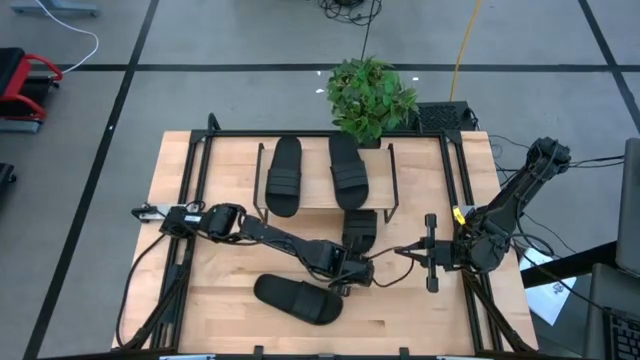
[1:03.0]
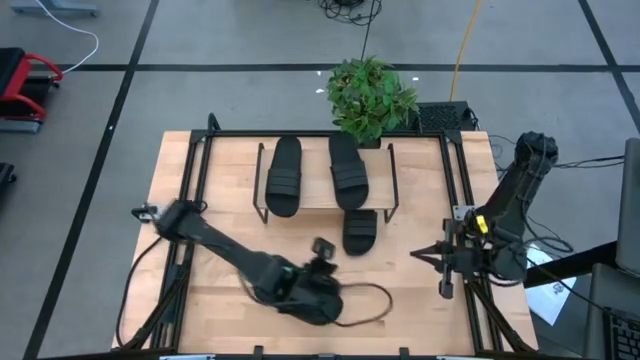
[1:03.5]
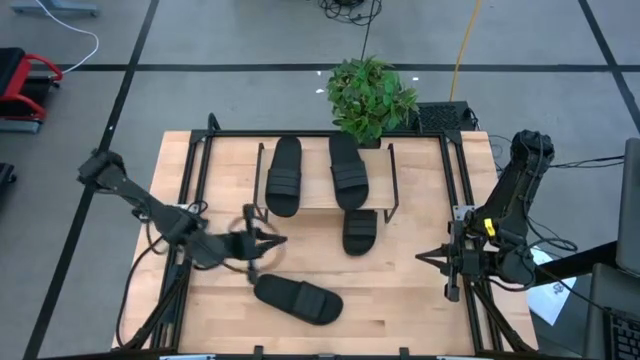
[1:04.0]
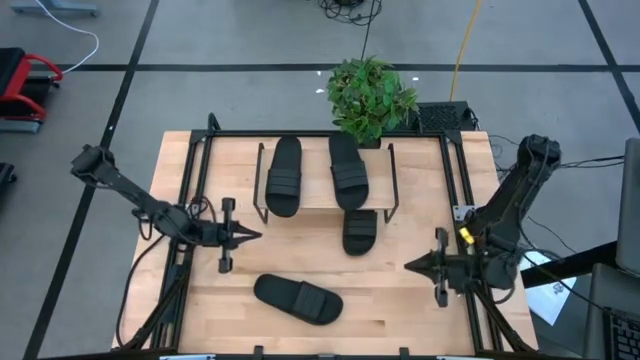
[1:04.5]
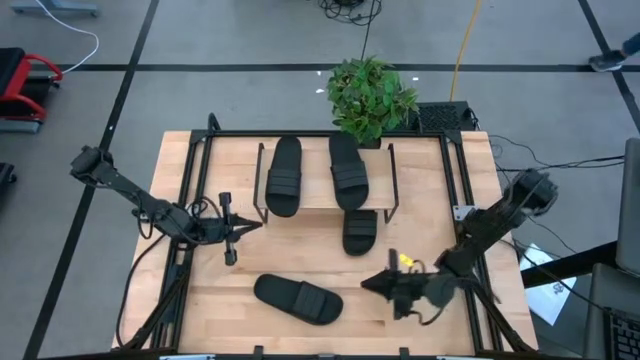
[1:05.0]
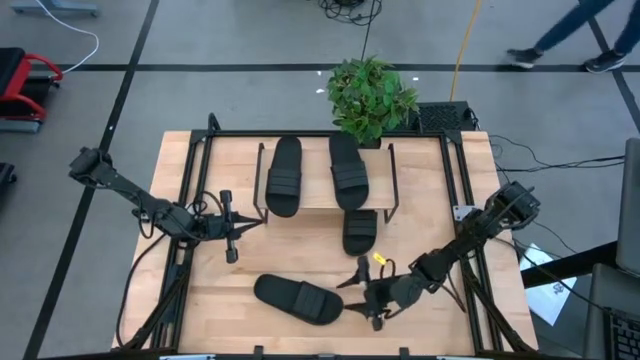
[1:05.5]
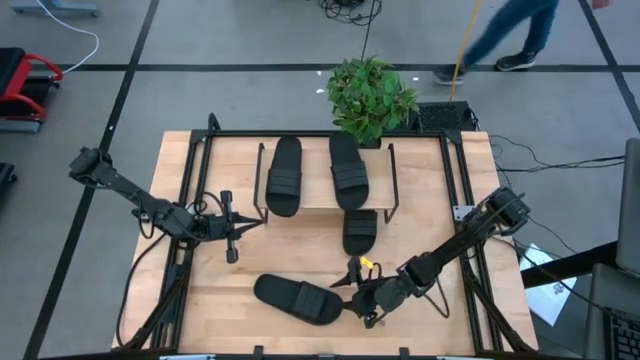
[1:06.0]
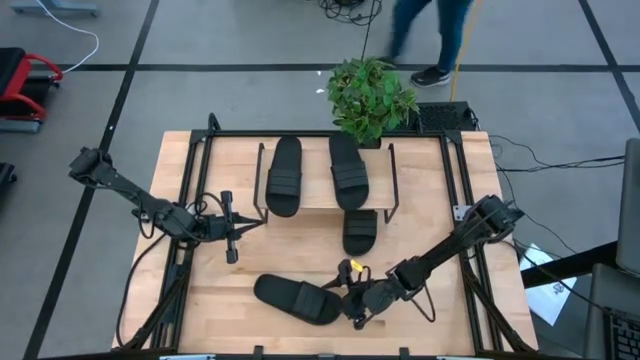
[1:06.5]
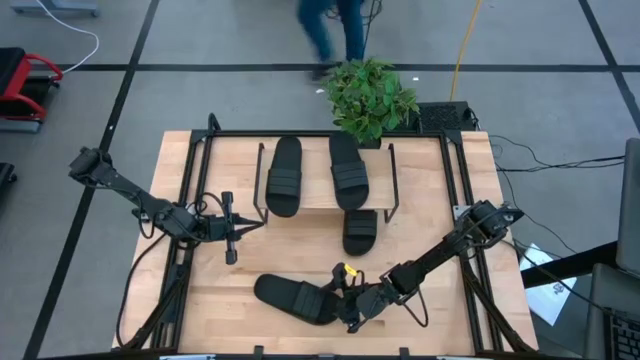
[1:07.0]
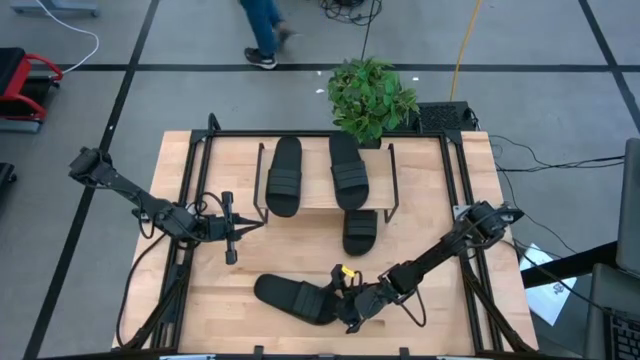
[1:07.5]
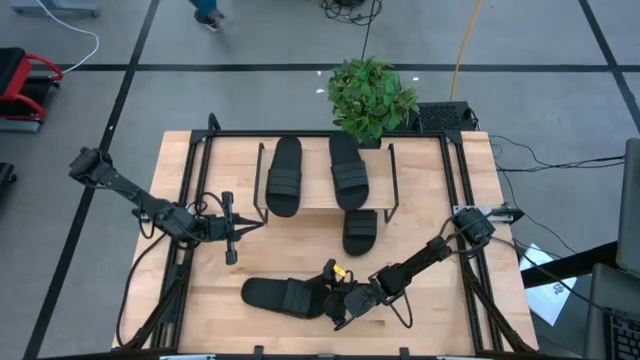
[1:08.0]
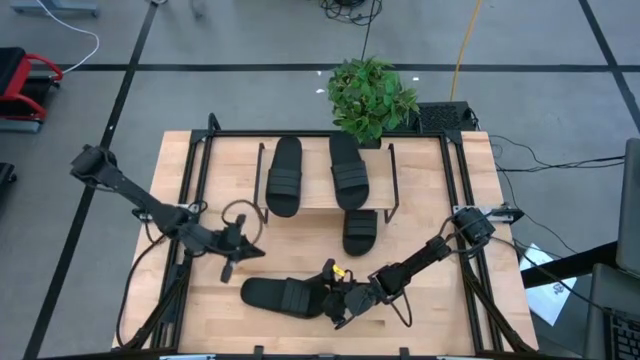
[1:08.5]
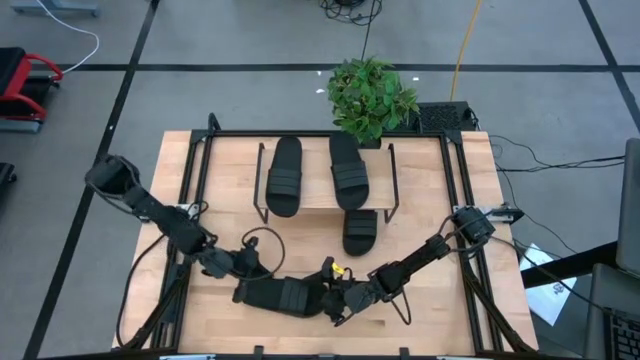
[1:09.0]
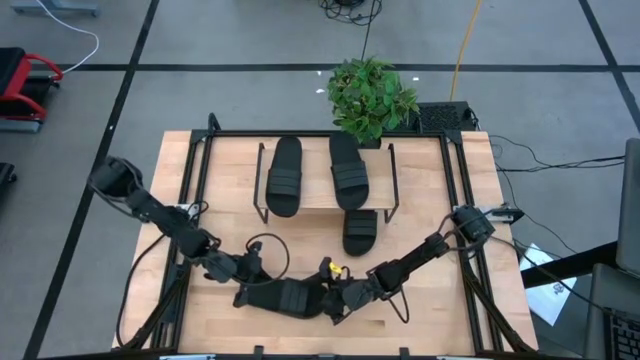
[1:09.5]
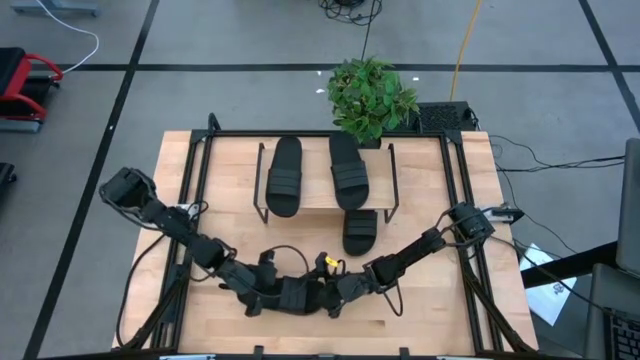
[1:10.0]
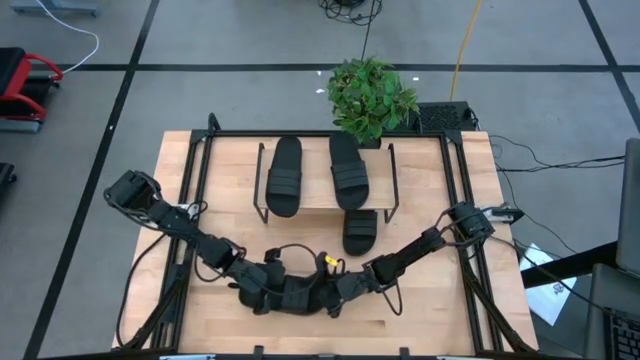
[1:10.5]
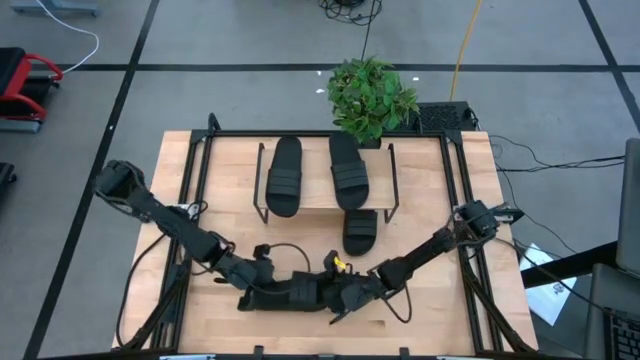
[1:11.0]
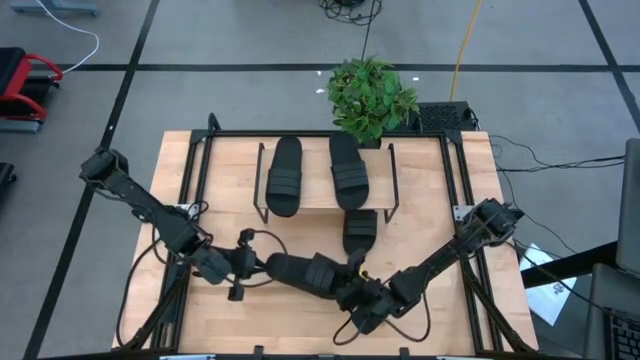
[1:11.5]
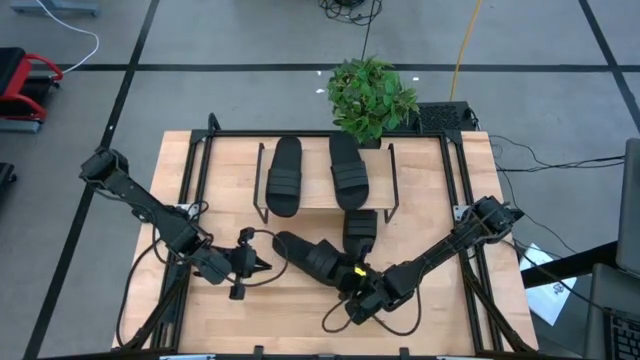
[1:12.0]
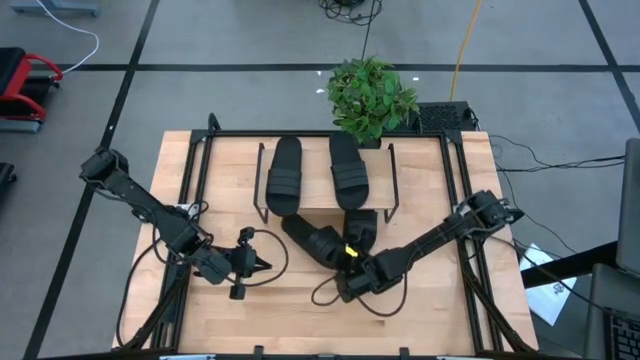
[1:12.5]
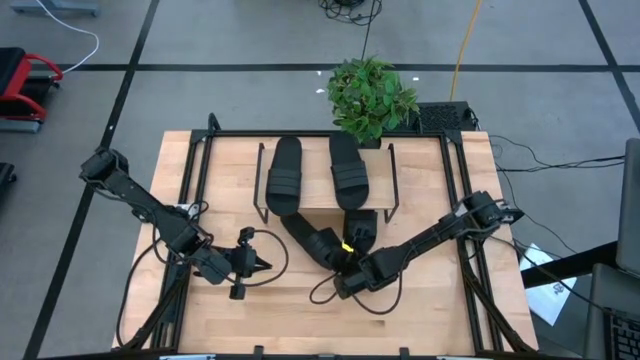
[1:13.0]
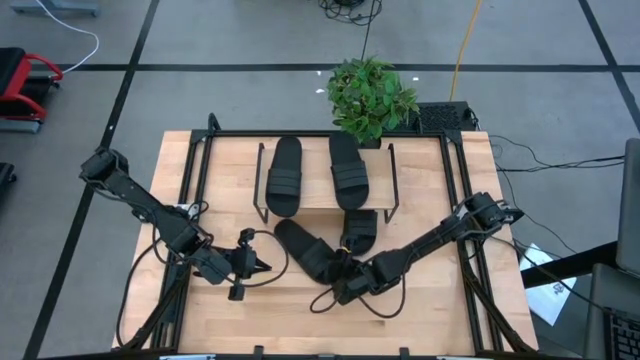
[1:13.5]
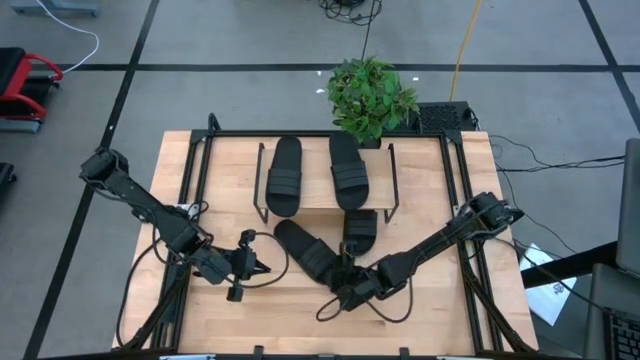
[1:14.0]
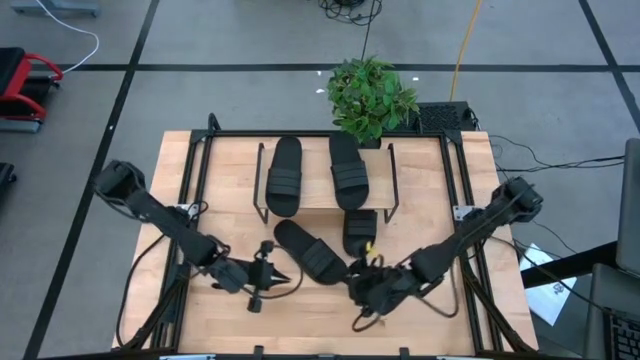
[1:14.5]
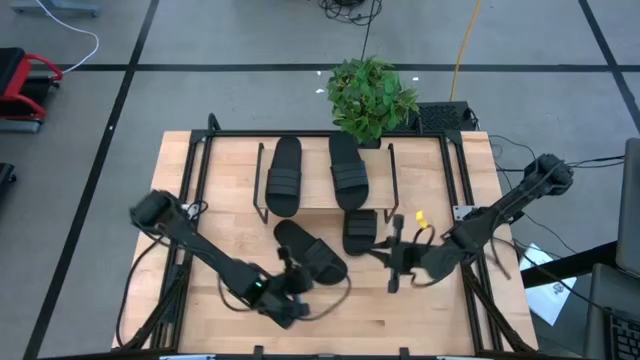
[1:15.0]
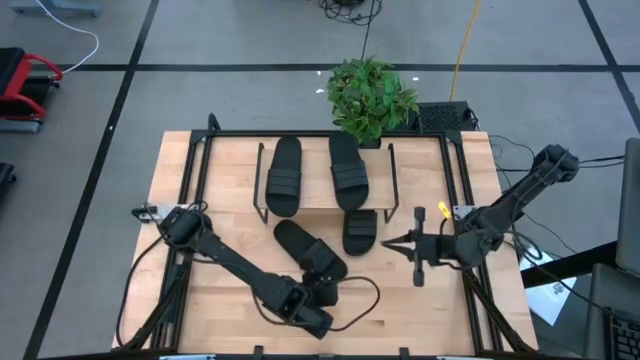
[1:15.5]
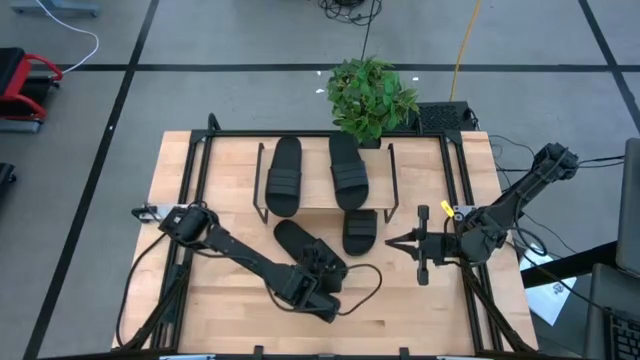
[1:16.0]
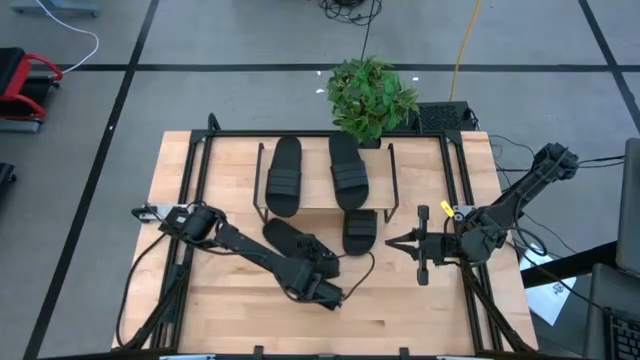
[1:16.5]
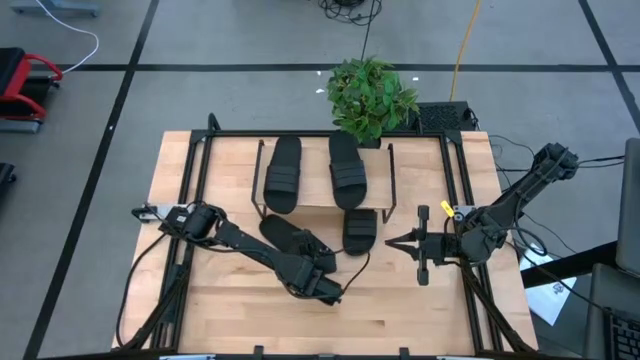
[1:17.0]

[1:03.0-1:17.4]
Task: Pick and place slides into the shelf
Put the black slide under the shelf

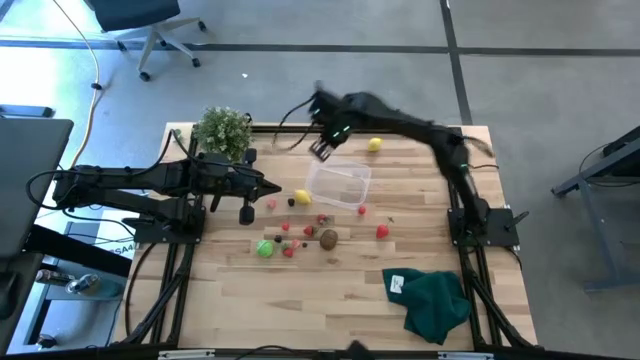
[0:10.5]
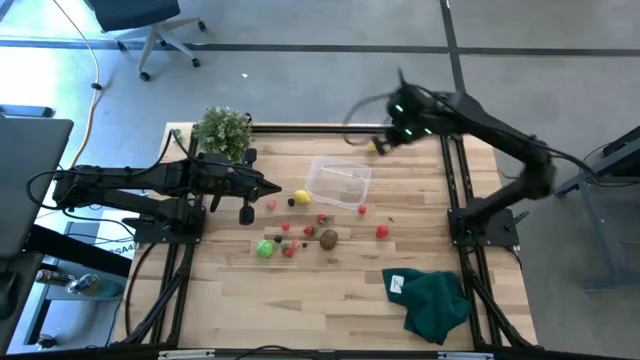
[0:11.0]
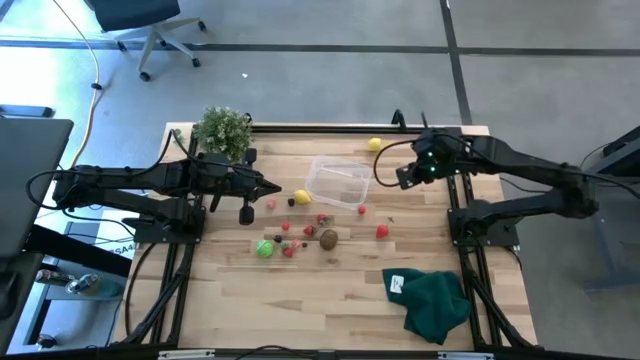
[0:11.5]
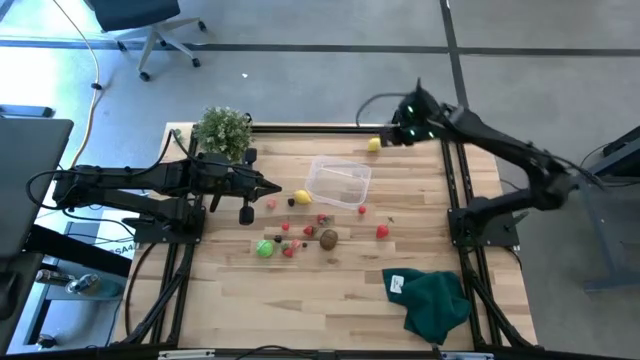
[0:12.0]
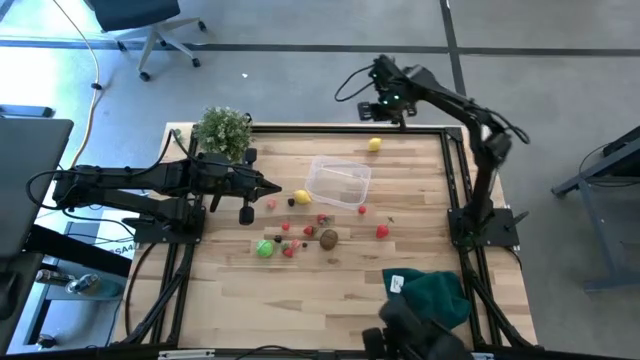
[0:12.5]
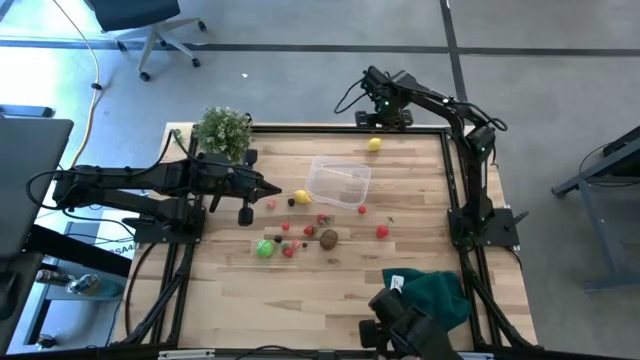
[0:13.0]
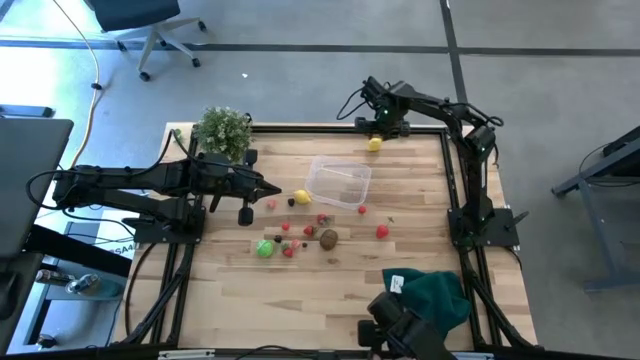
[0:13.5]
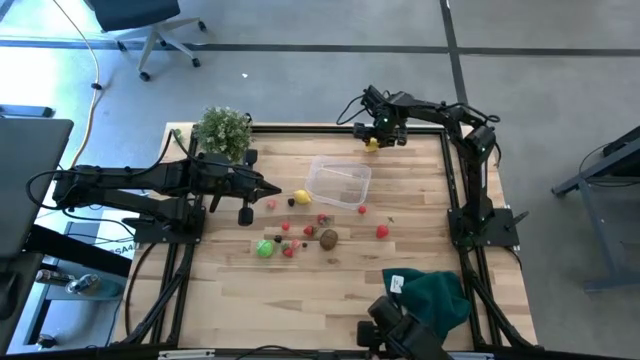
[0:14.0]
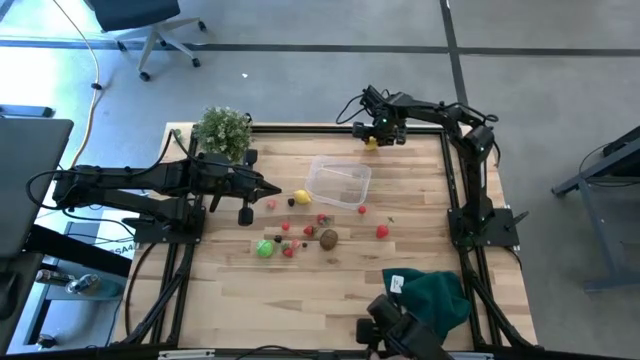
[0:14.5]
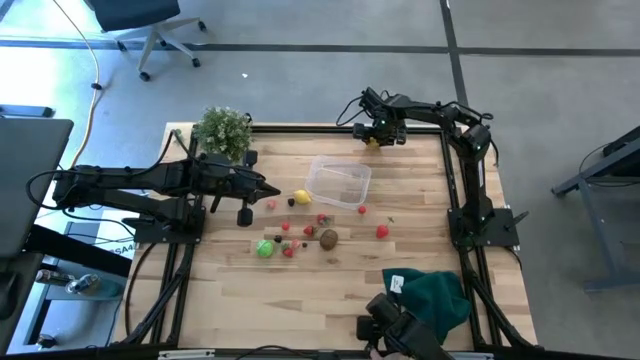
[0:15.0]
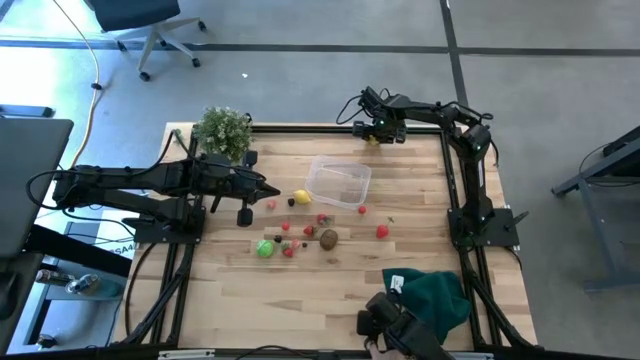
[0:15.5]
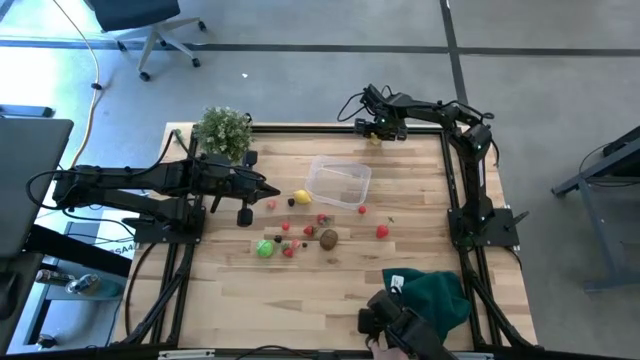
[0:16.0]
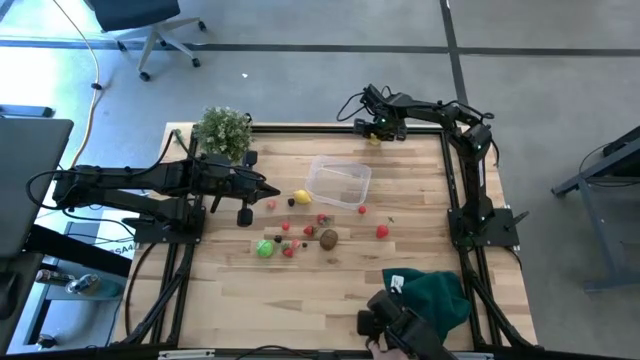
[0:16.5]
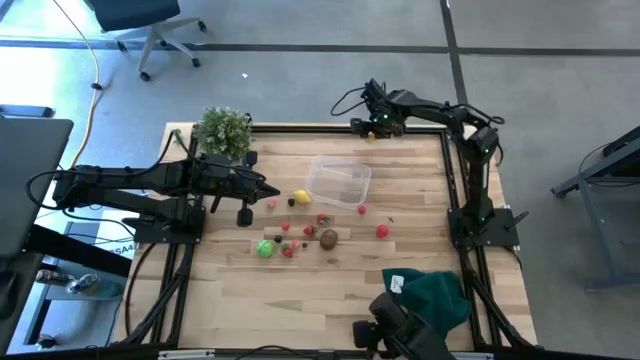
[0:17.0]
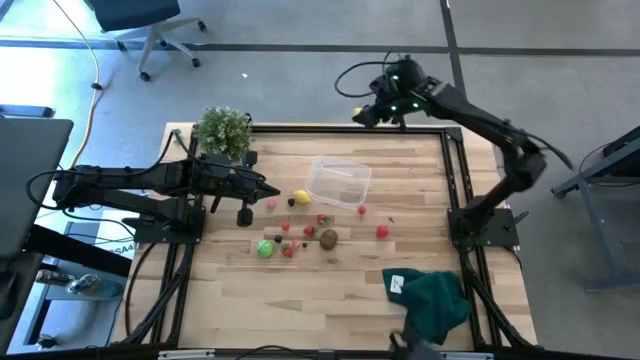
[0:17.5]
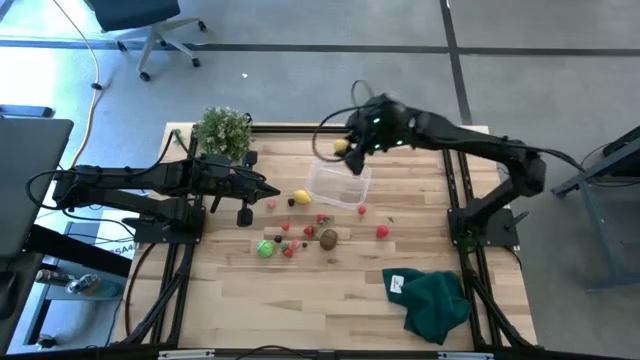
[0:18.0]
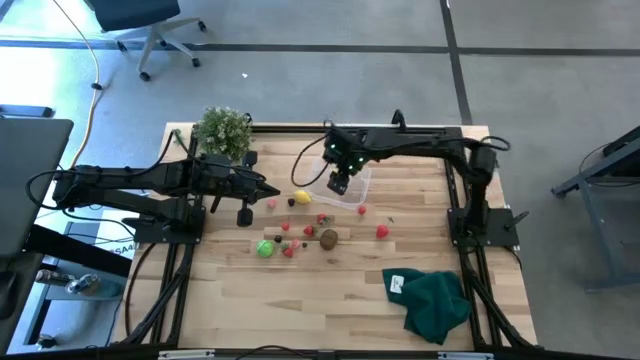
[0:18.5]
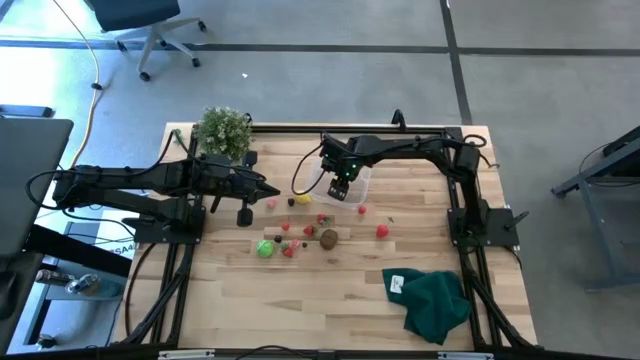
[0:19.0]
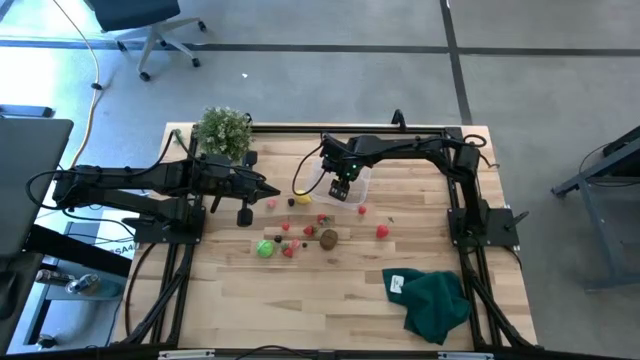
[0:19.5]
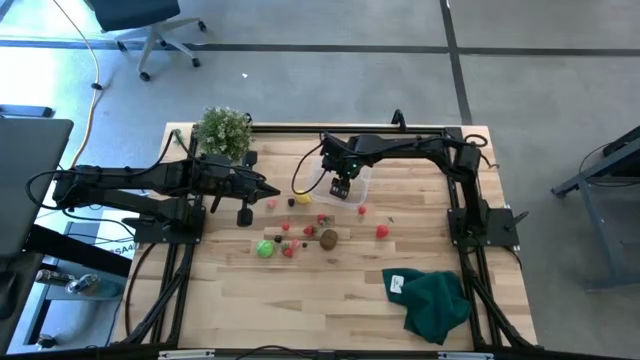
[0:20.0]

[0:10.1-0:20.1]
Task: Pick and placing Produce into tupperware
Put the yellow lemon into the transparent bin
